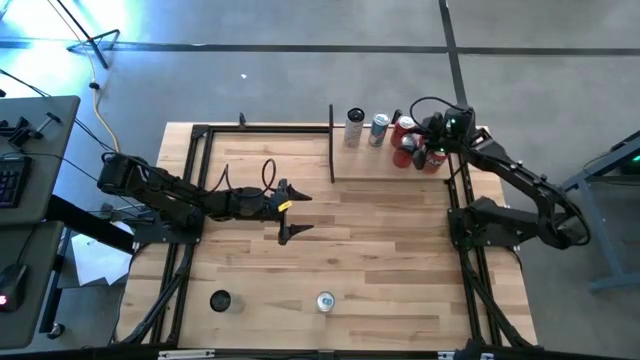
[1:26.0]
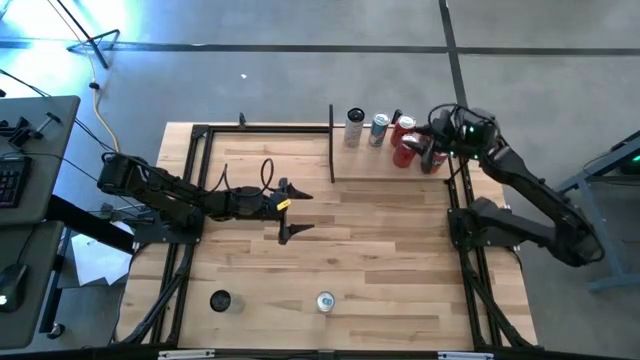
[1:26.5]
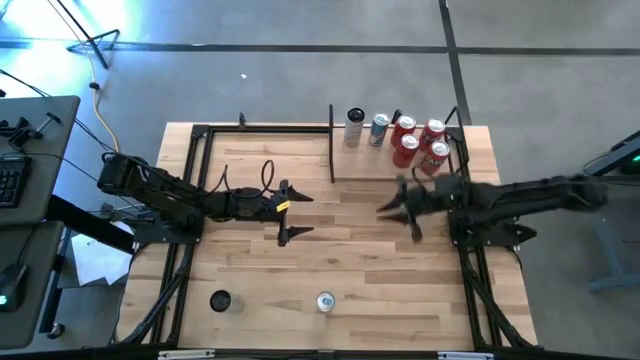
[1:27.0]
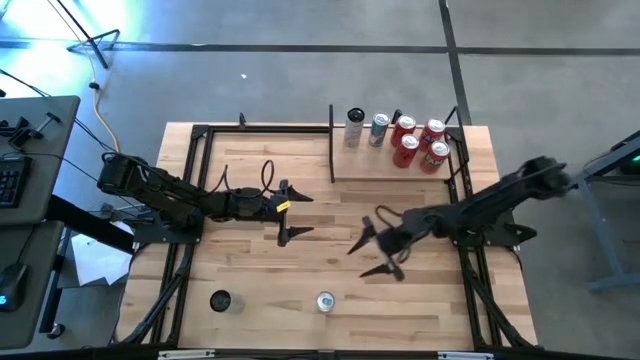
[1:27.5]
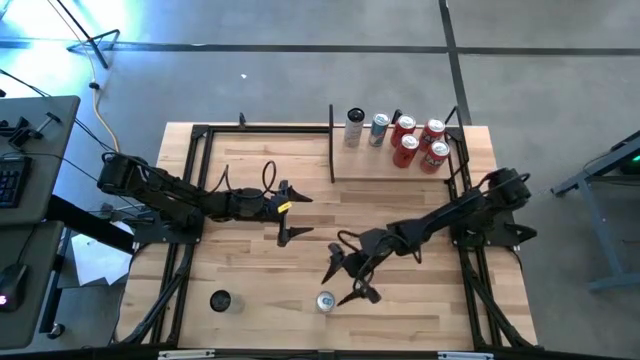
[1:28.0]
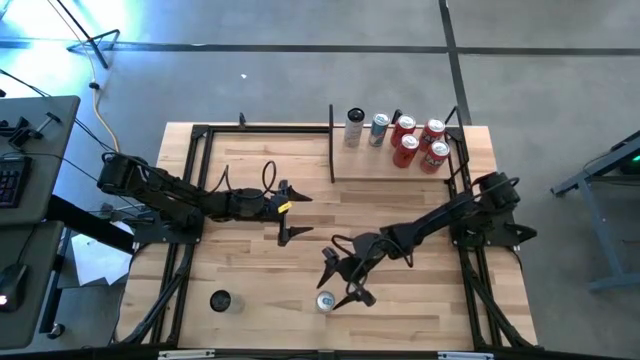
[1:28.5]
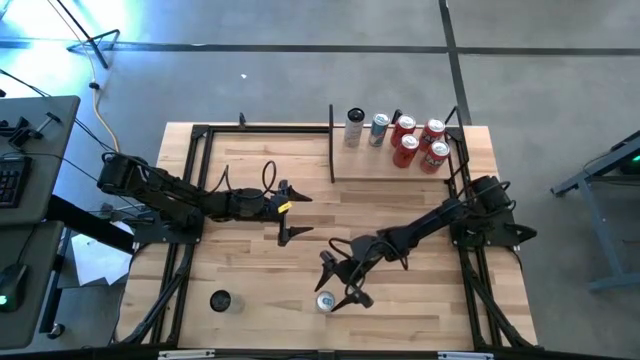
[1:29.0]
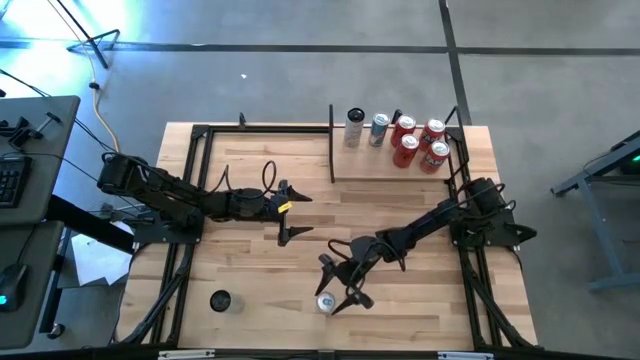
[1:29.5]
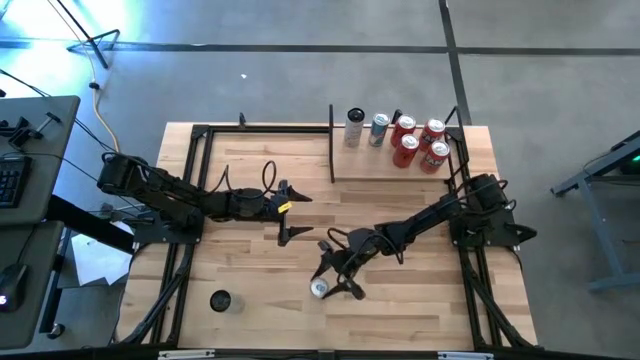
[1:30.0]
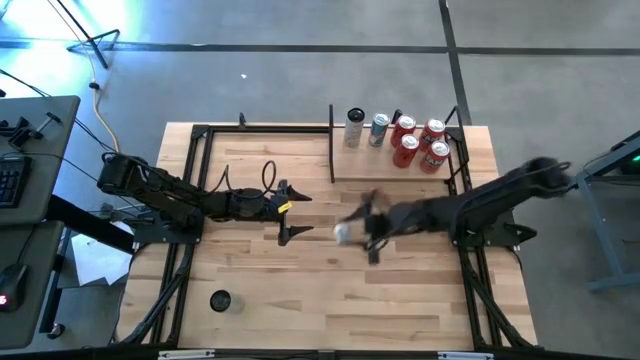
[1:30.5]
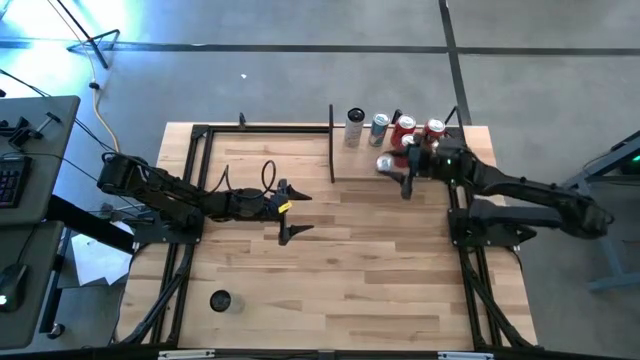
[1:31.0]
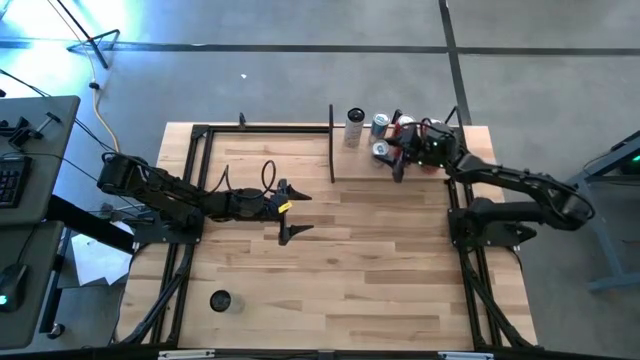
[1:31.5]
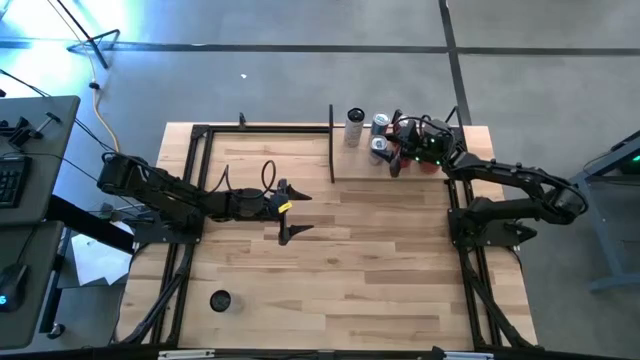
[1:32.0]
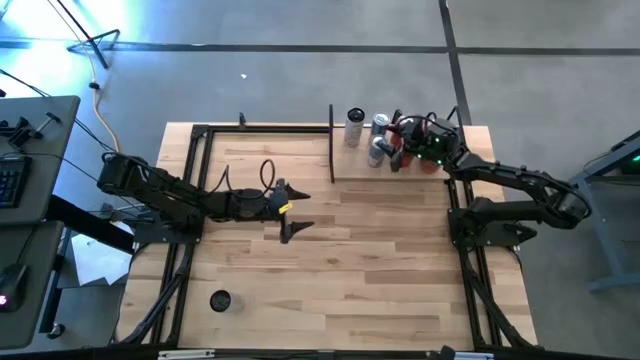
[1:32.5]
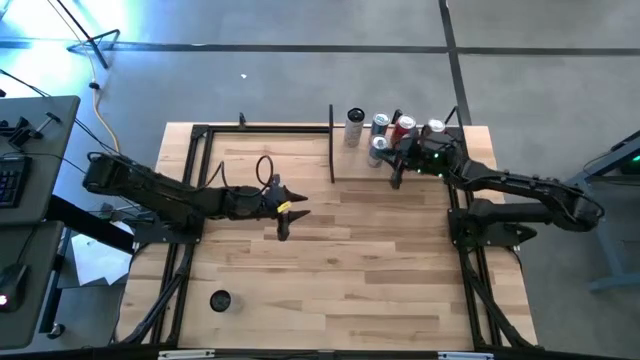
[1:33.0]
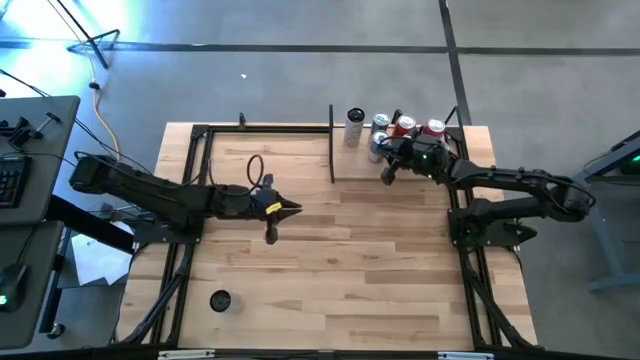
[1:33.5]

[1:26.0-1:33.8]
Task: Place canned beverage on shelf
Put the blue soda can on the shelf and align it with the other blue soda can

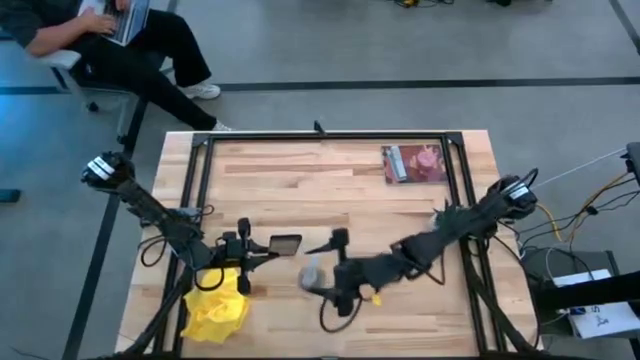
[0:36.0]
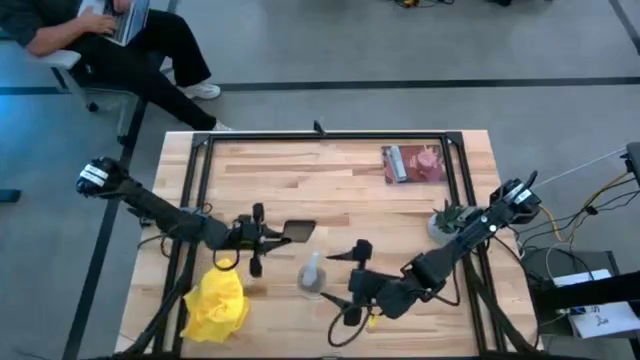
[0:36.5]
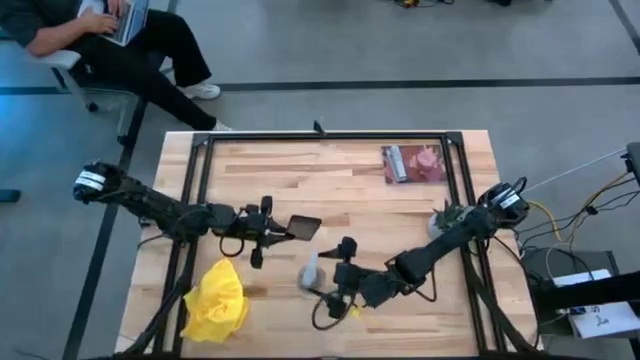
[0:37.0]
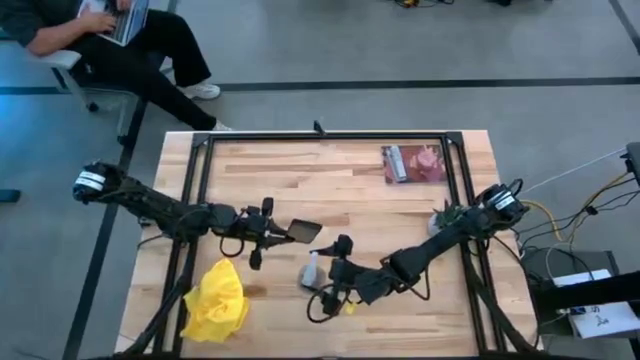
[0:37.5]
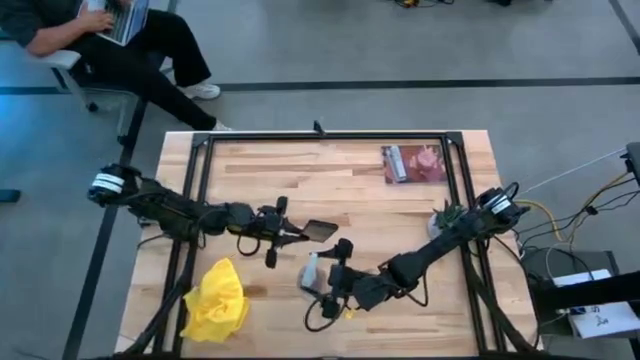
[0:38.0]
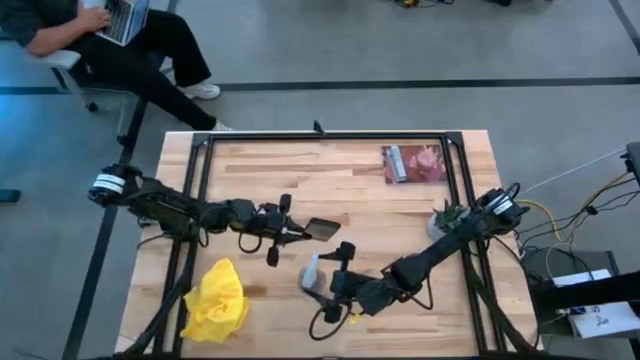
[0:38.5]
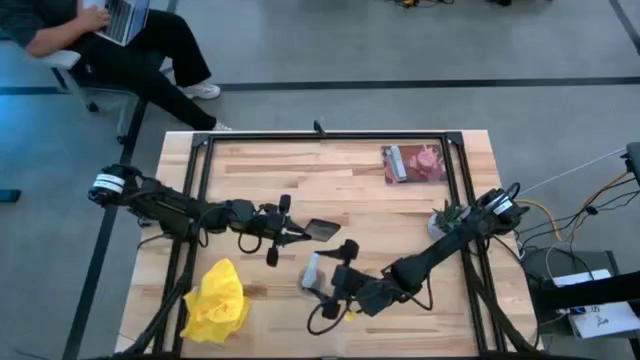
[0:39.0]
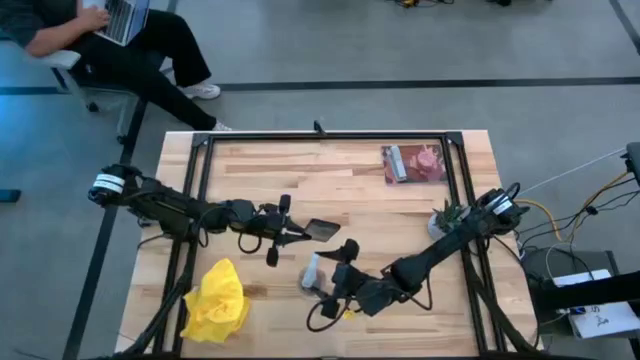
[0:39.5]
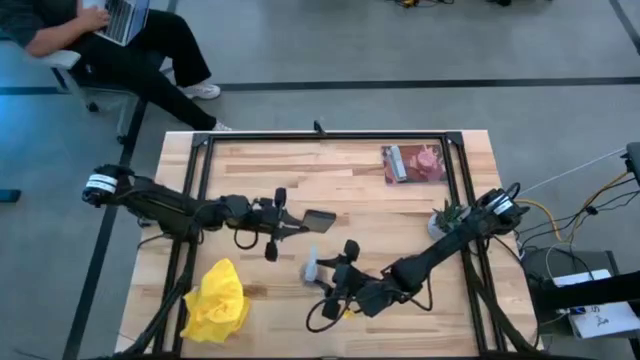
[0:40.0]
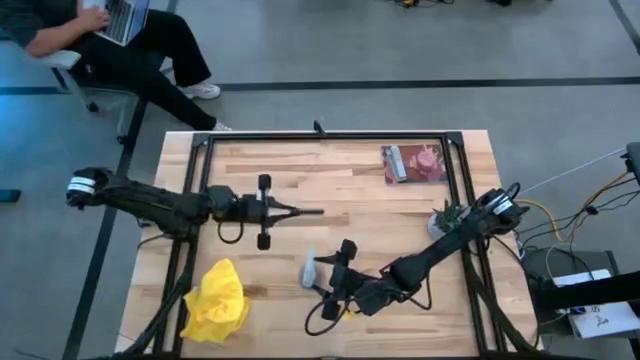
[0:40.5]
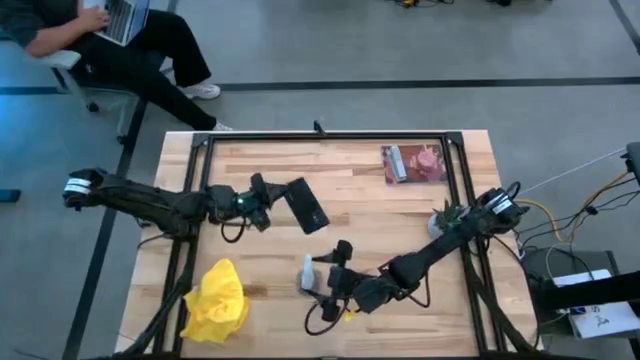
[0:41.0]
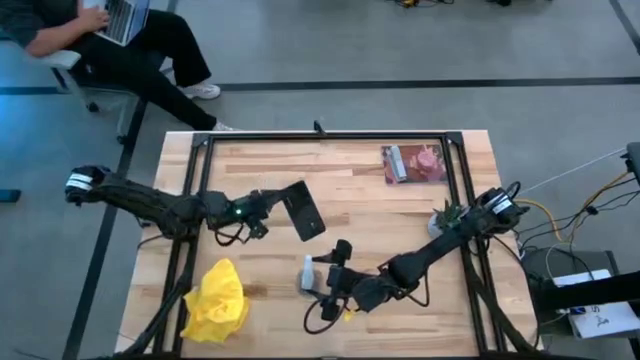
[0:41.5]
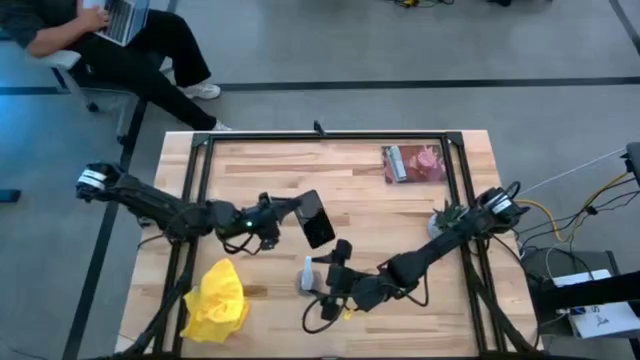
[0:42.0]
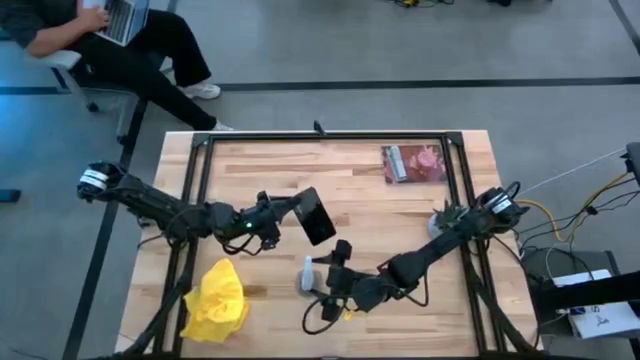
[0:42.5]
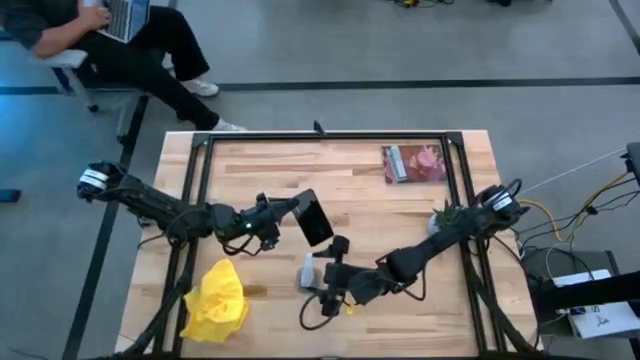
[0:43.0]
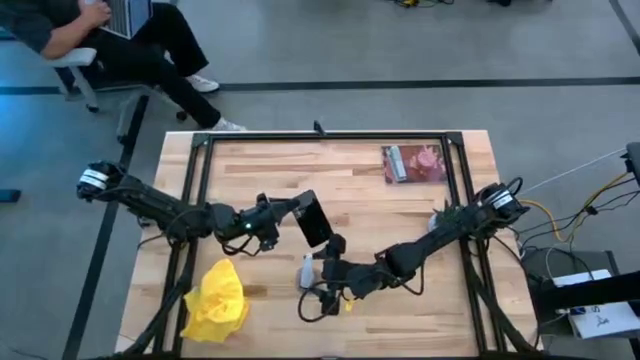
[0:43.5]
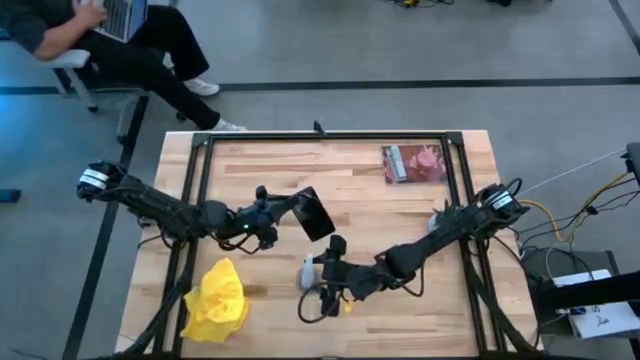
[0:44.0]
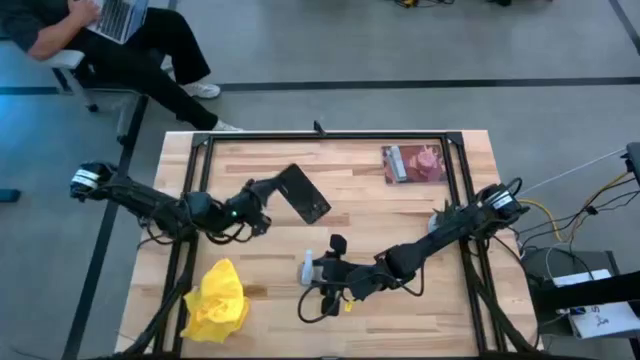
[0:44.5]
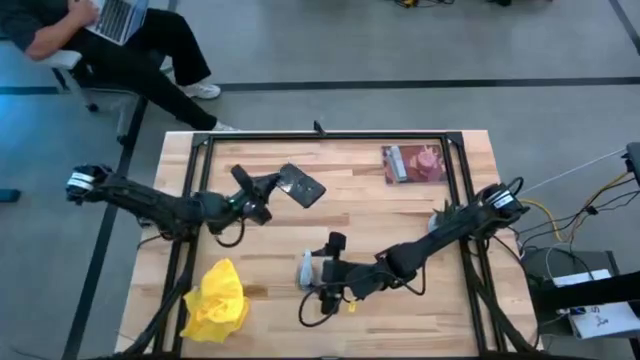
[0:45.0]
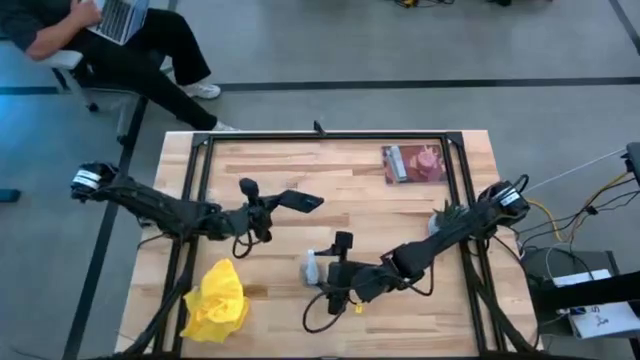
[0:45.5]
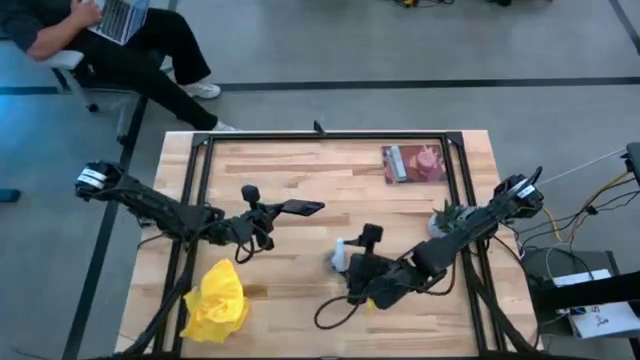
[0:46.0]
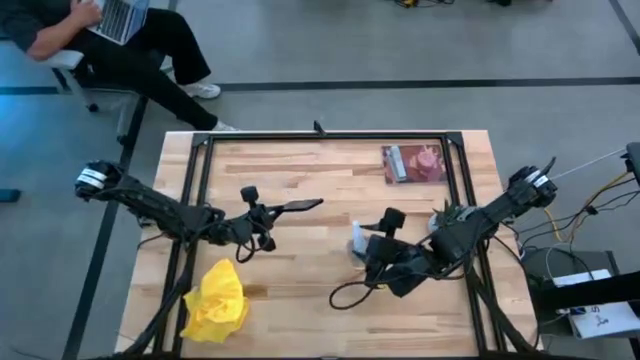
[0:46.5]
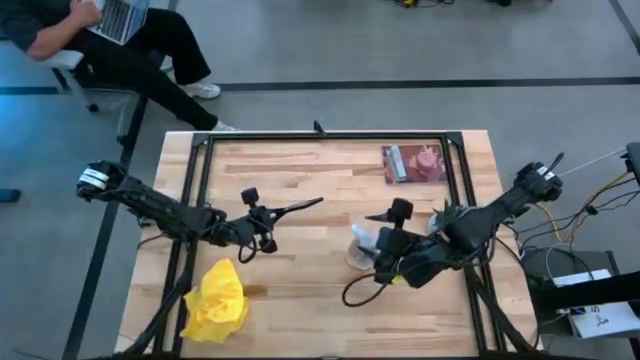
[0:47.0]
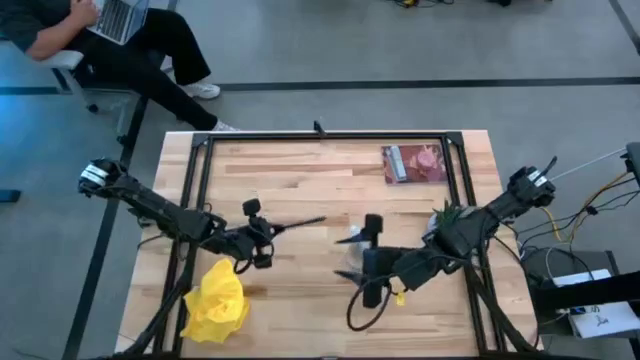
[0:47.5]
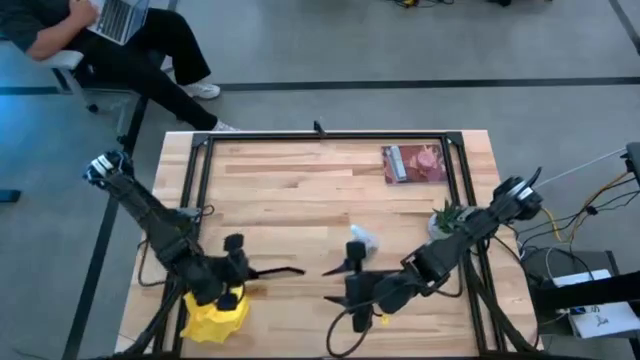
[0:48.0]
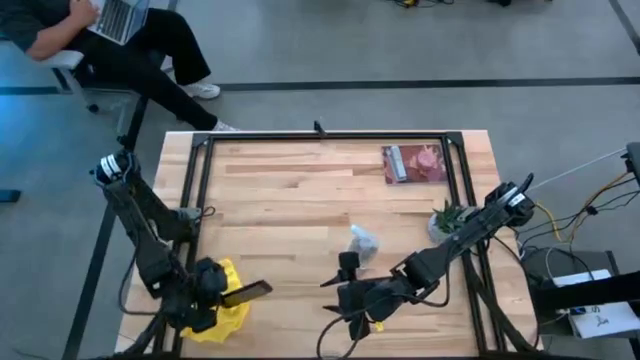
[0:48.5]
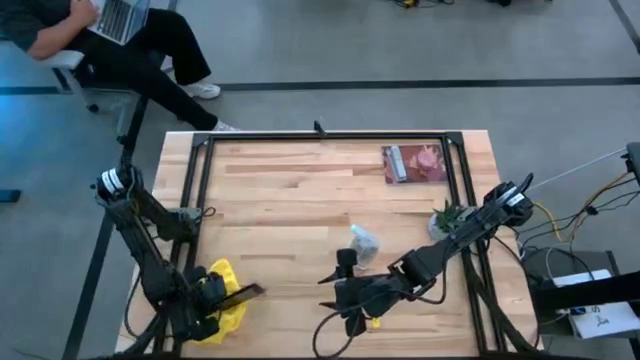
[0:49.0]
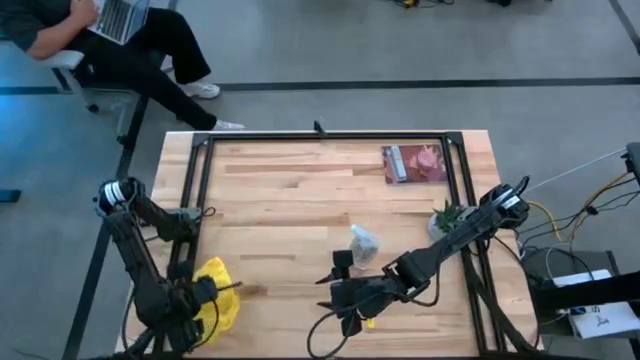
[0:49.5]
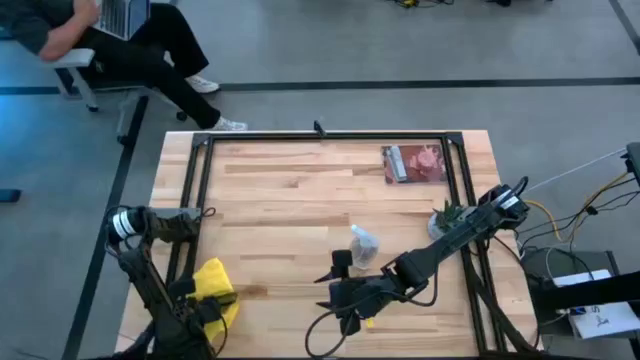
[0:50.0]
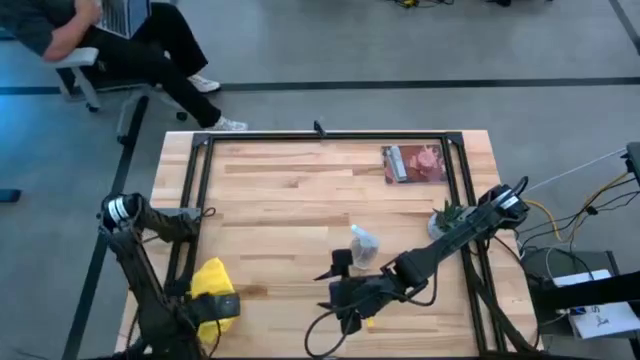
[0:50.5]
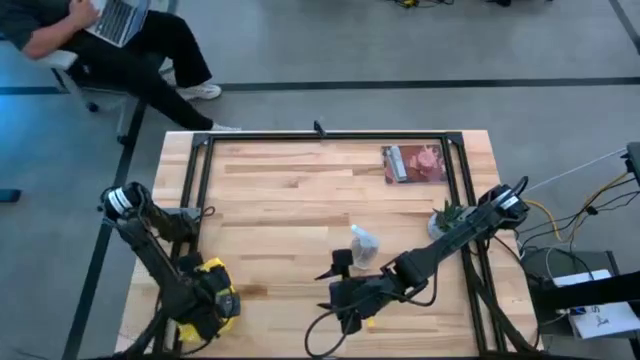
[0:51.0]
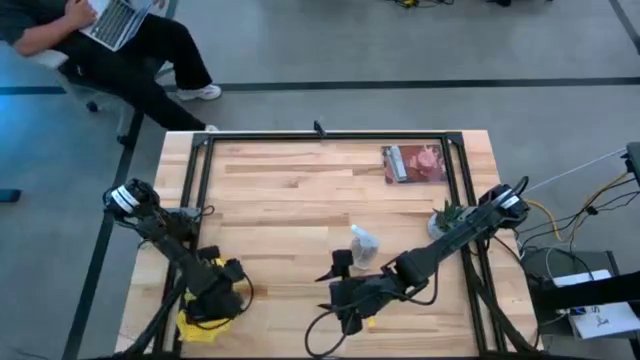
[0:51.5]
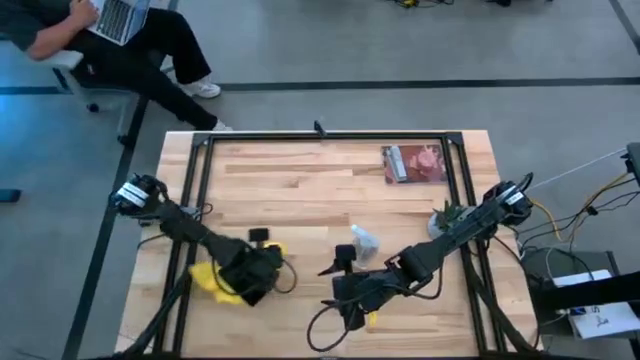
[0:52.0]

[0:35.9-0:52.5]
Task: Apply microfiber cloth
Spray the black cellphone with the spray bottle
